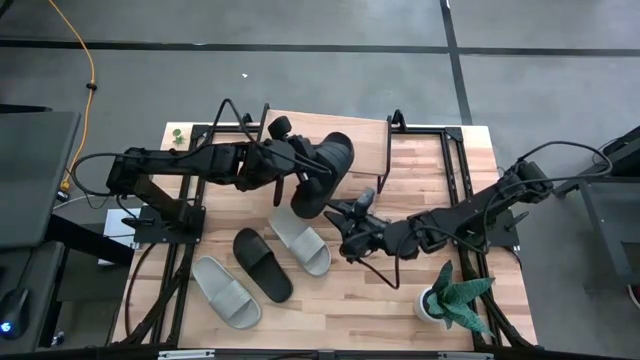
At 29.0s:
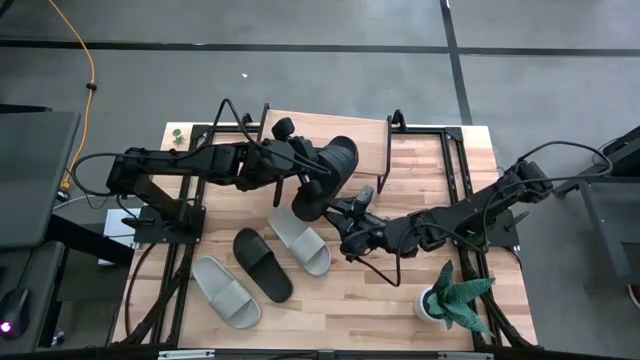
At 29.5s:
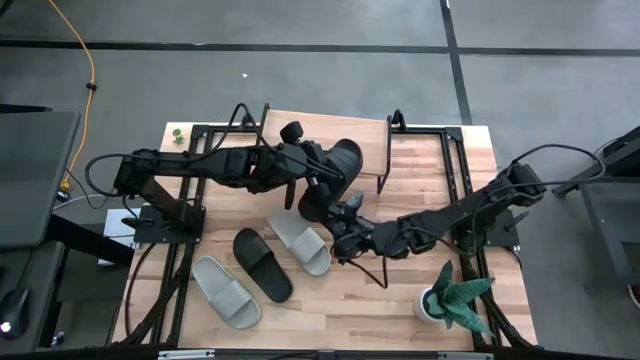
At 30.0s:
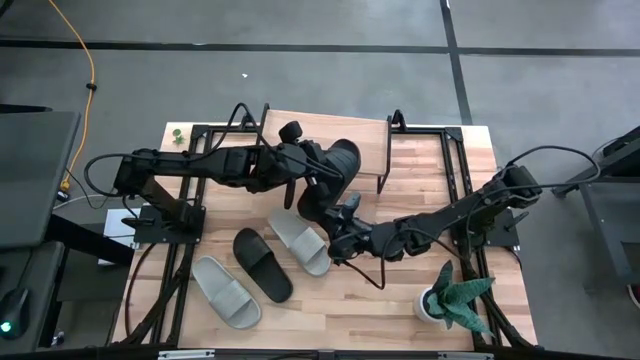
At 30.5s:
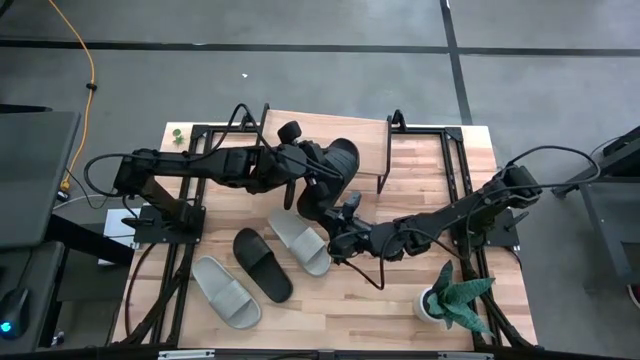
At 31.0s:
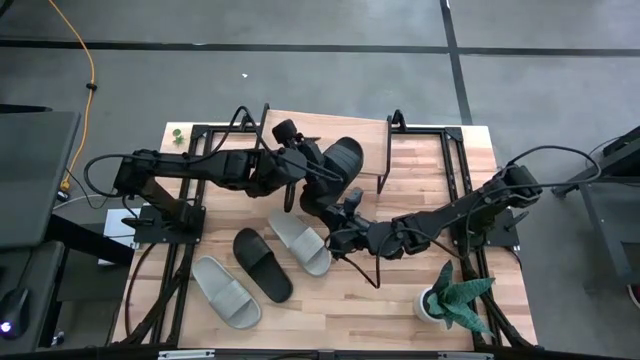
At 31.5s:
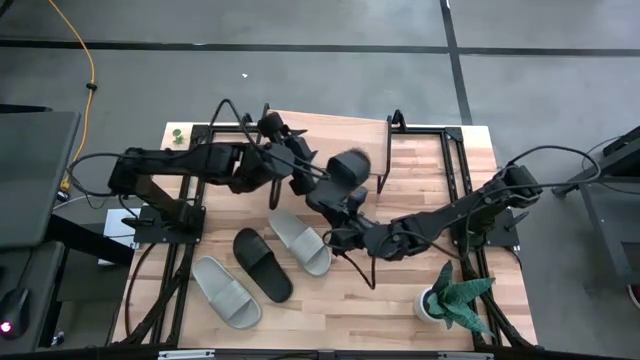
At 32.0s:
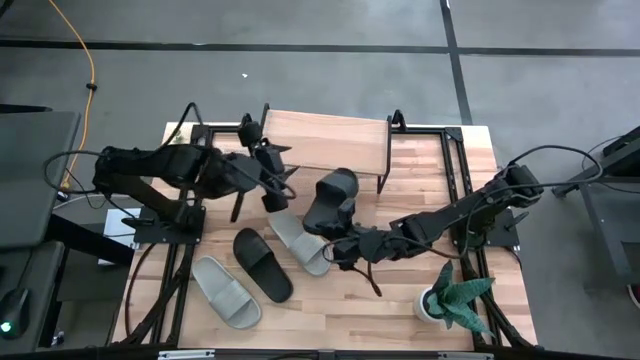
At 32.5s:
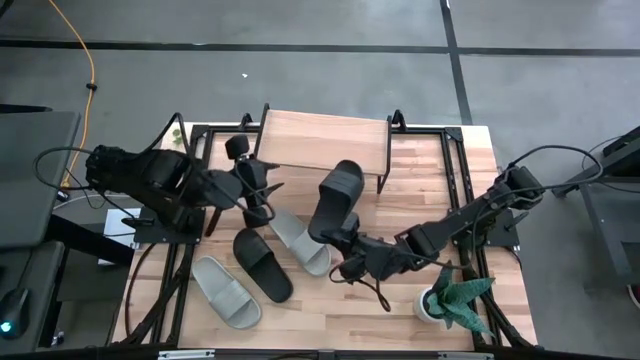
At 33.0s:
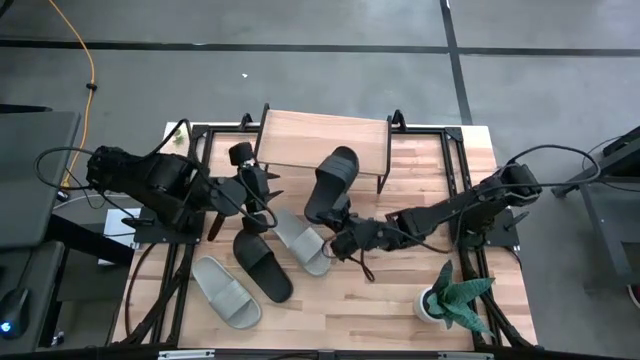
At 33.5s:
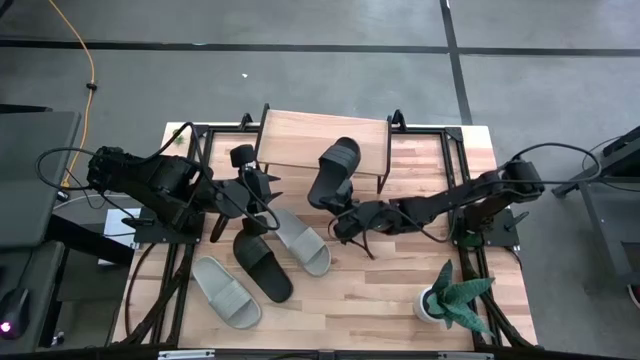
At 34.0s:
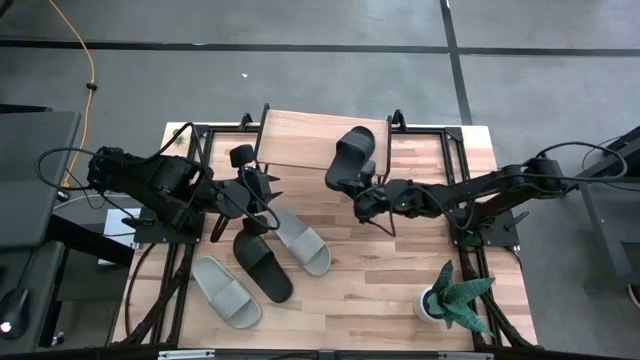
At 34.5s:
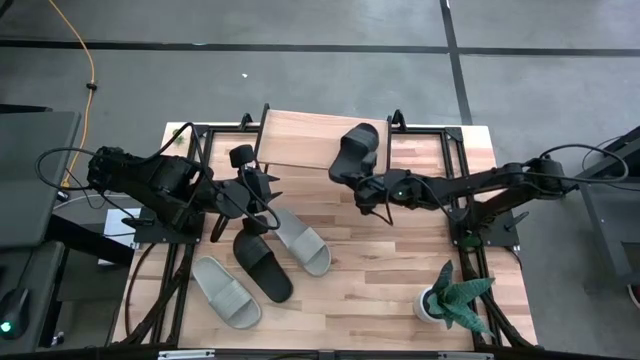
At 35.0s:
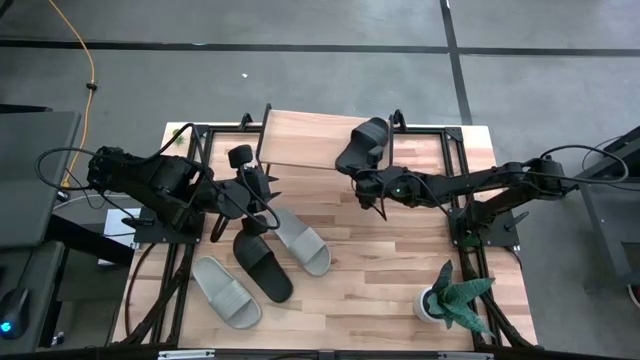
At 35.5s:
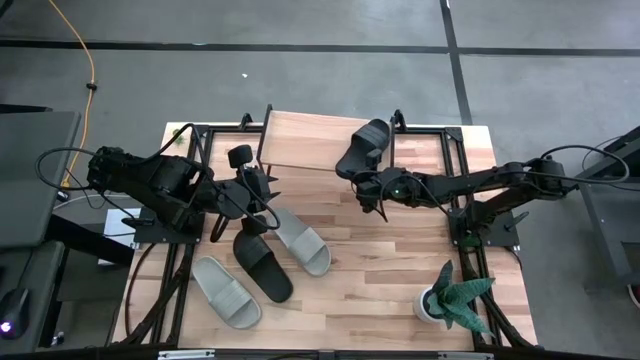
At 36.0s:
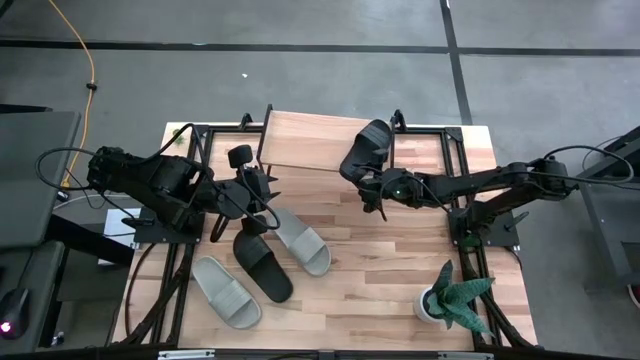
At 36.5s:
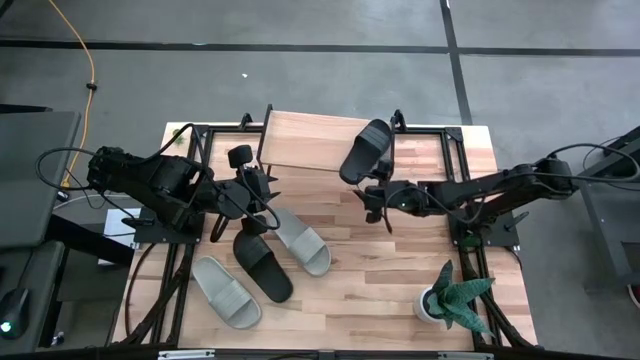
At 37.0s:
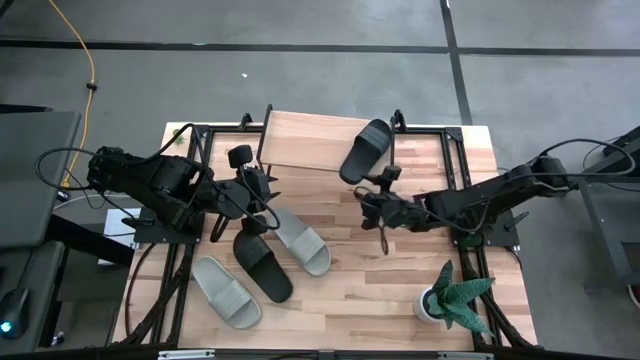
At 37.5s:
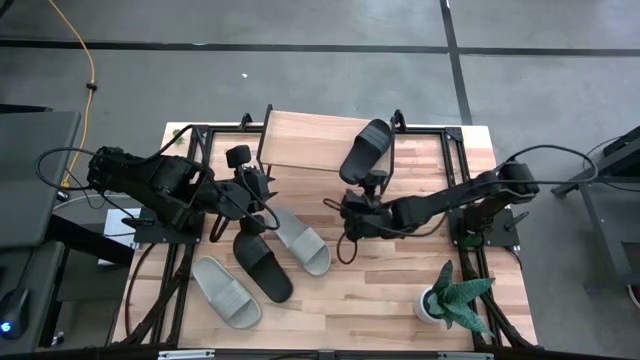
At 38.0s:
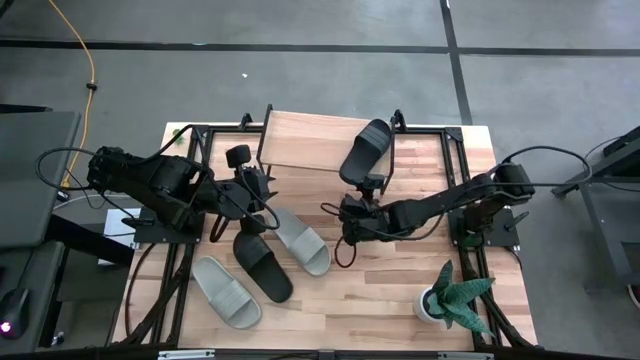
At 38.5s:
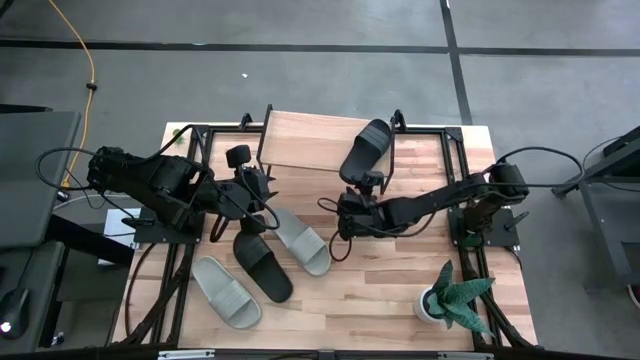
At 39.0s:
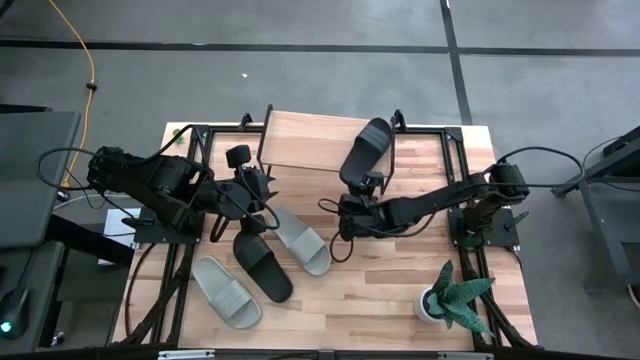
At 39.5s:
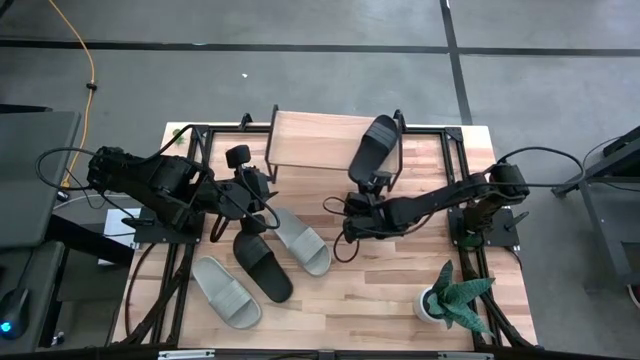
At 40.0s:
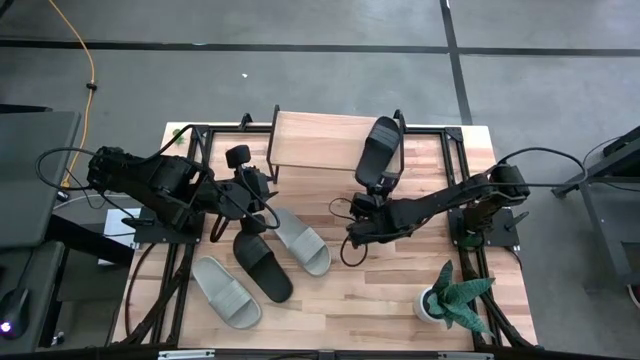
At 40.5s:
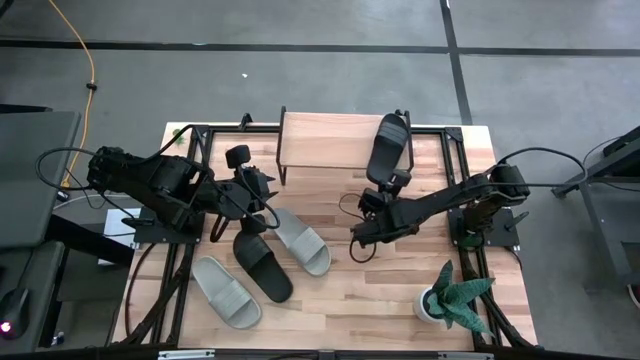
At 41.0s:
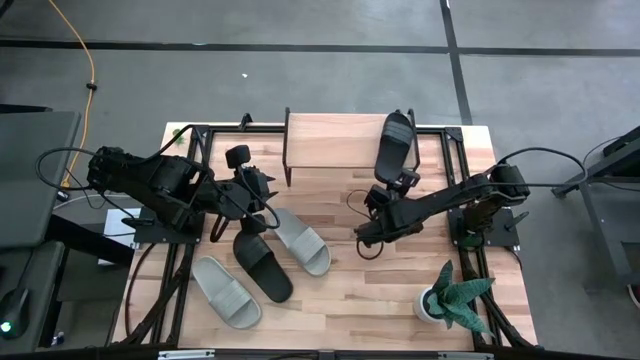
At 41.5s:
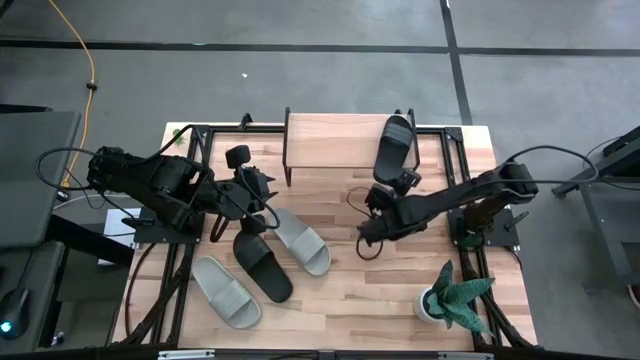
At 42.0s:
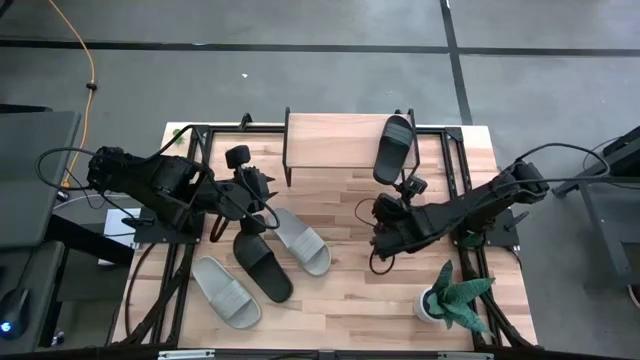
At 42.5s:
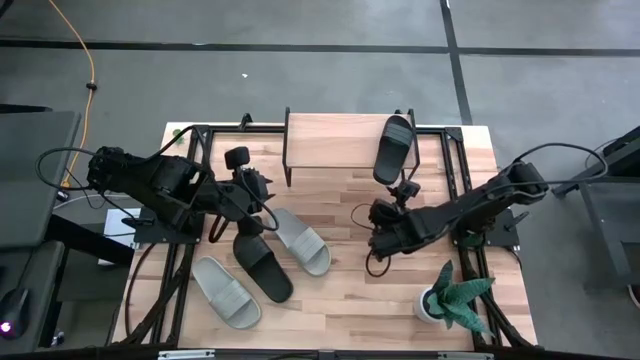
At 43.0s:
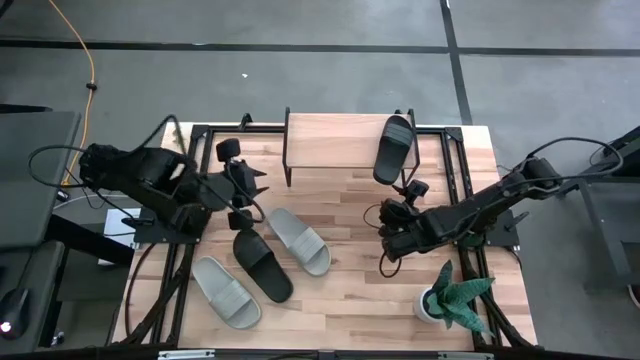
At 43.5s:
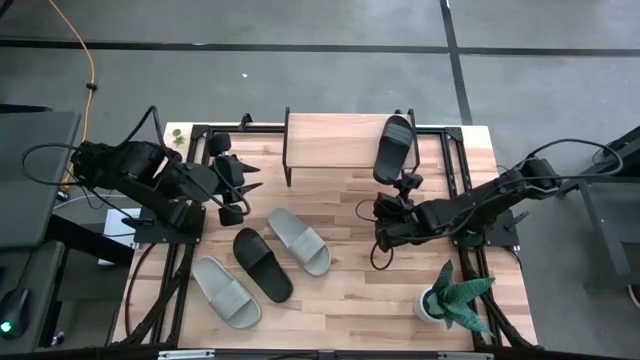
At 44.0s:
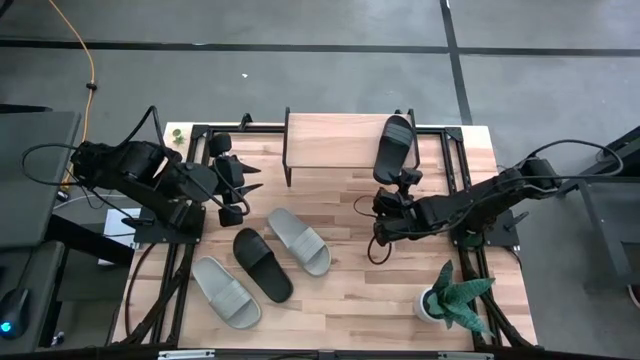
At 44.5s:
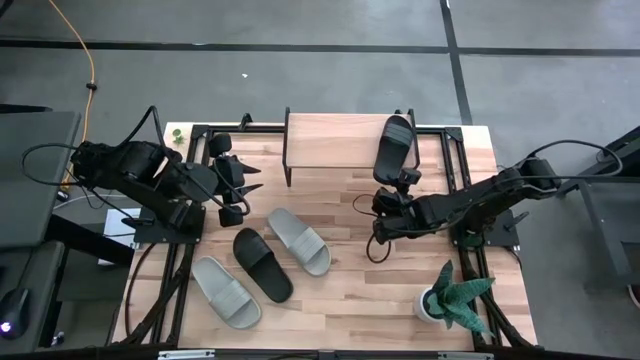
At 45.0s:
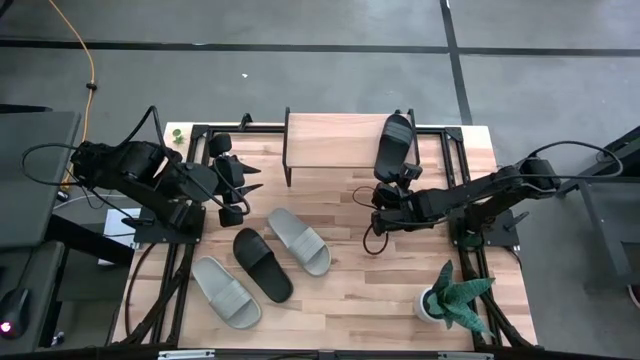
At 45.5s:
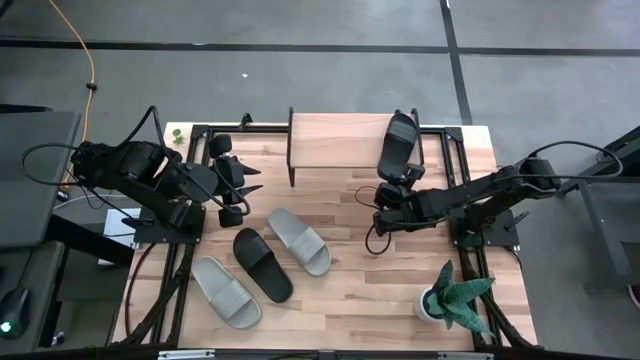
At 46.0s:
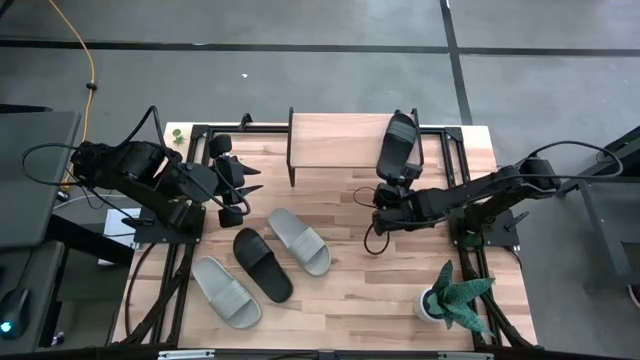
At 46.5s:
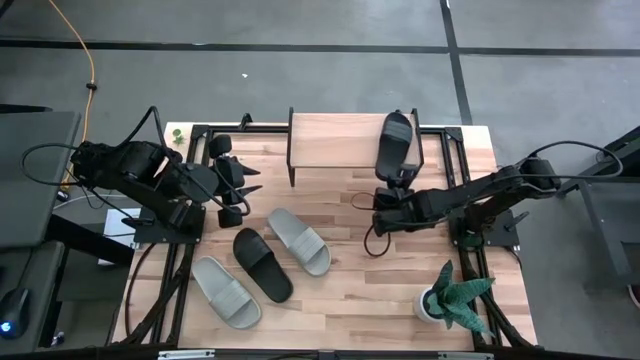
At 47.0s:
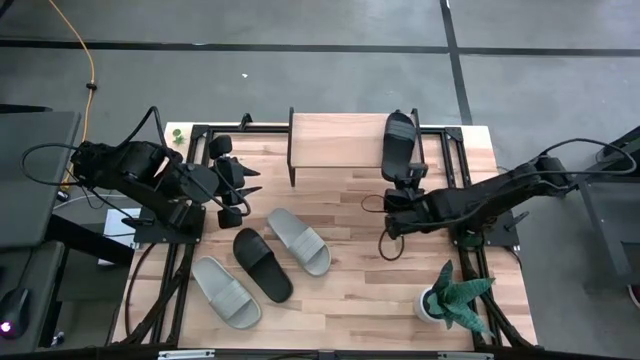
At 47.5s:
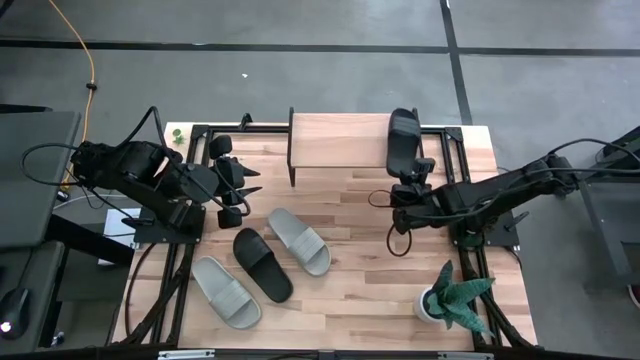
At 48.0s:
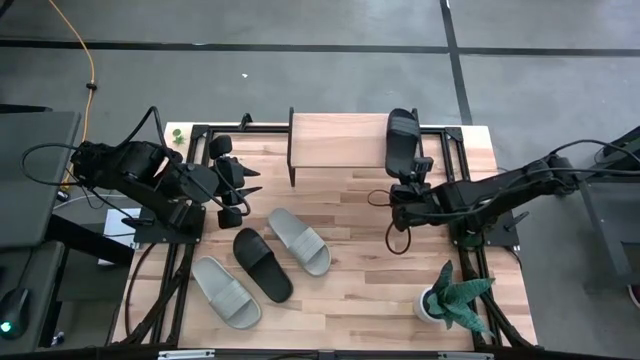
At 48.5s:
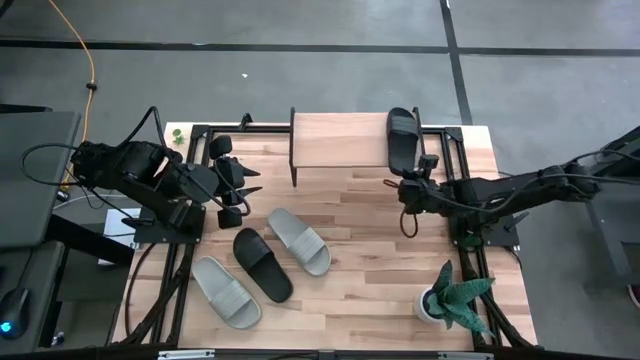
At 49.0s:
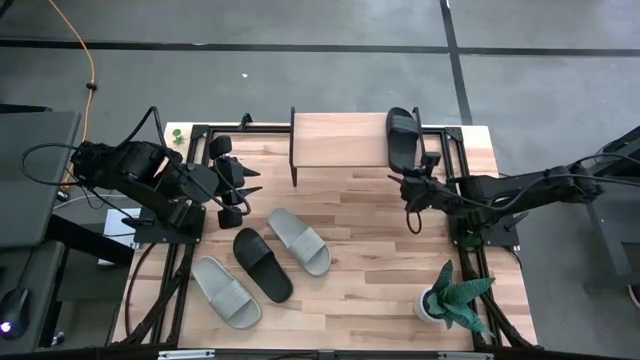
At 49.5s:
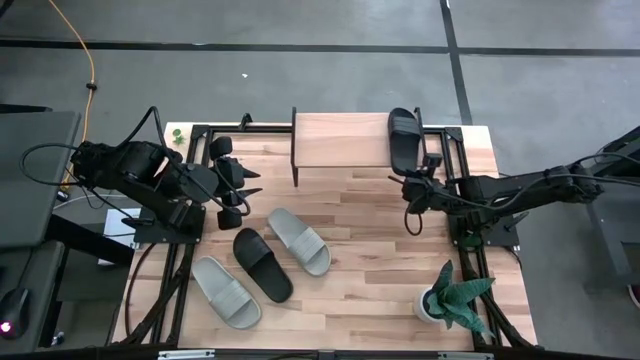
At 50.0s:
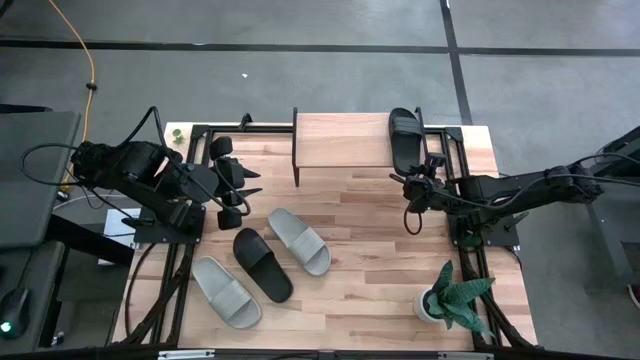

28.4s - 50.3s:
Task: Pick and place slides into the shelf
Put the right black slipper on the shelf
